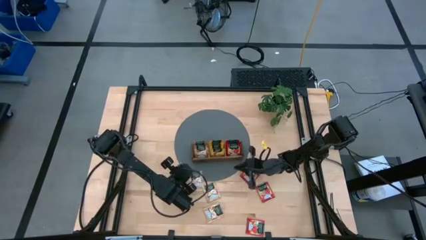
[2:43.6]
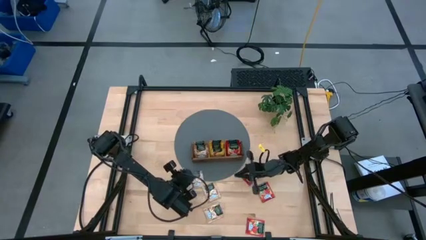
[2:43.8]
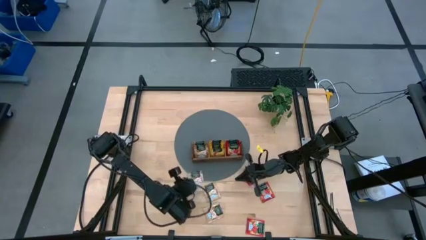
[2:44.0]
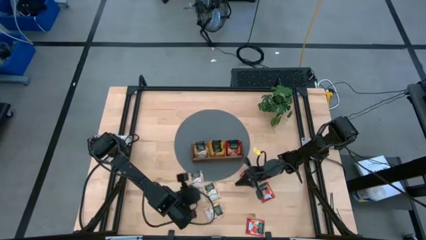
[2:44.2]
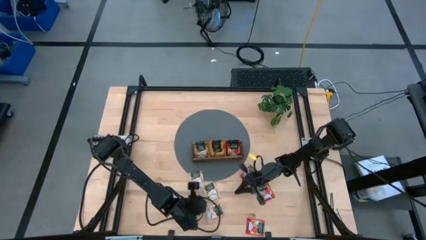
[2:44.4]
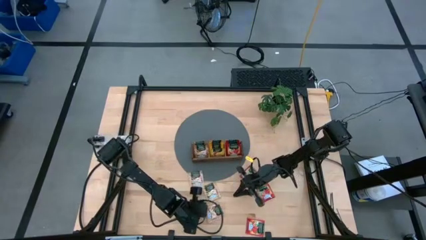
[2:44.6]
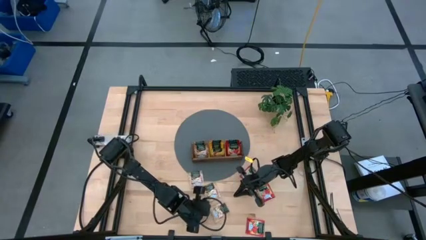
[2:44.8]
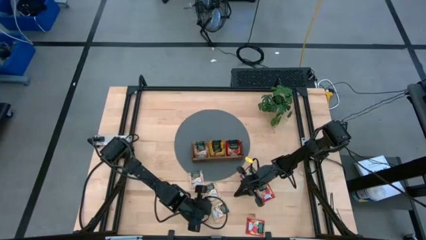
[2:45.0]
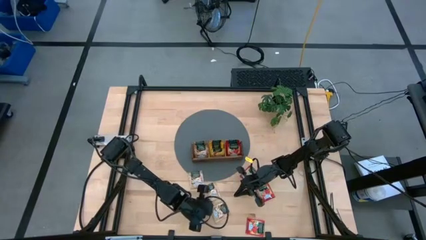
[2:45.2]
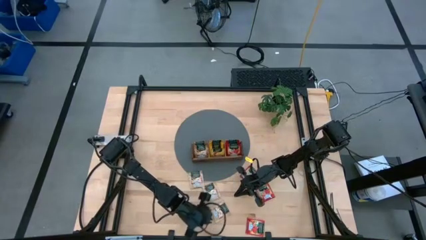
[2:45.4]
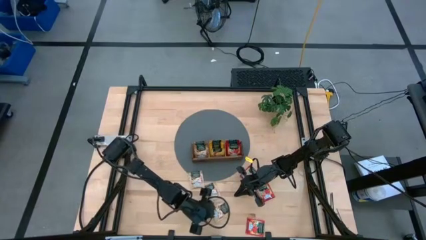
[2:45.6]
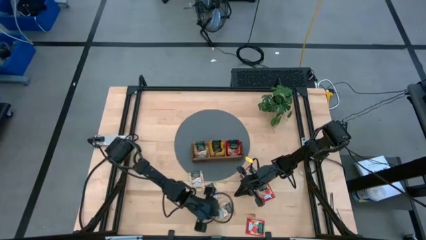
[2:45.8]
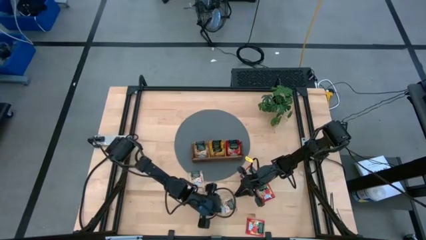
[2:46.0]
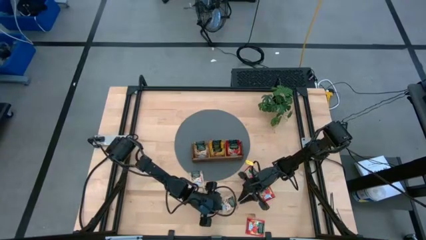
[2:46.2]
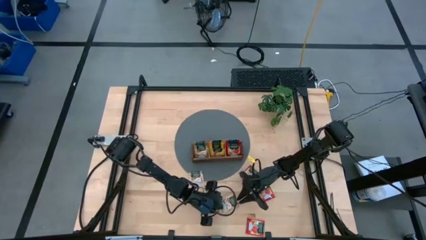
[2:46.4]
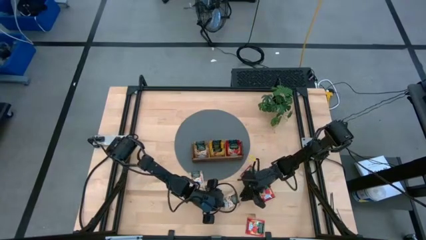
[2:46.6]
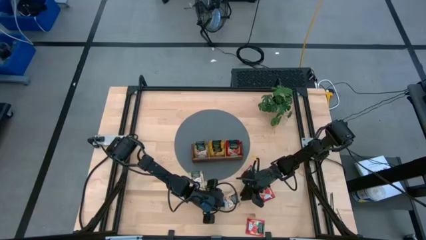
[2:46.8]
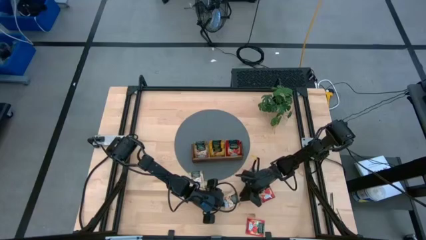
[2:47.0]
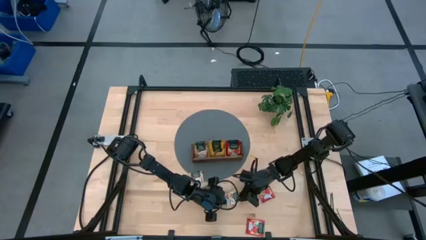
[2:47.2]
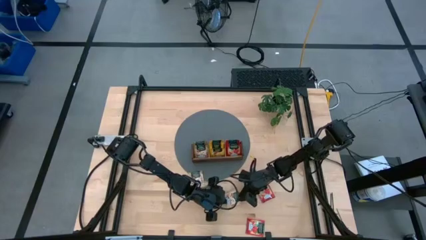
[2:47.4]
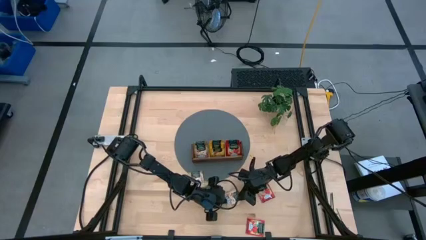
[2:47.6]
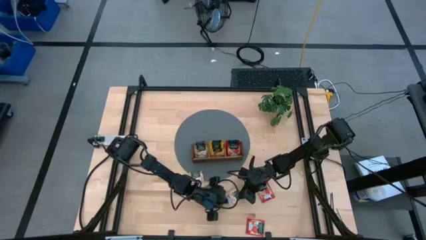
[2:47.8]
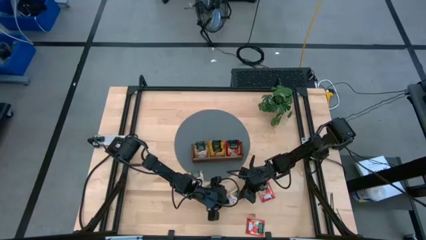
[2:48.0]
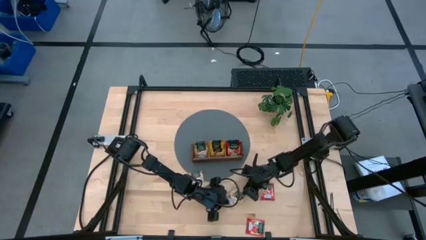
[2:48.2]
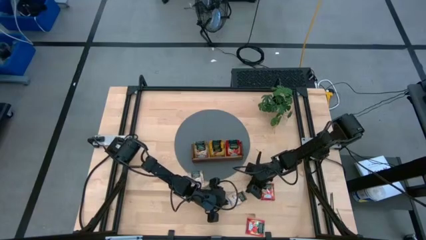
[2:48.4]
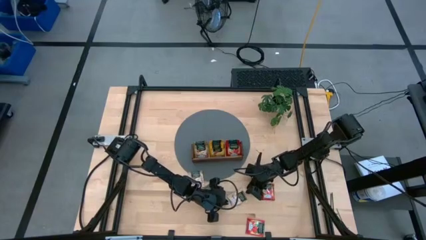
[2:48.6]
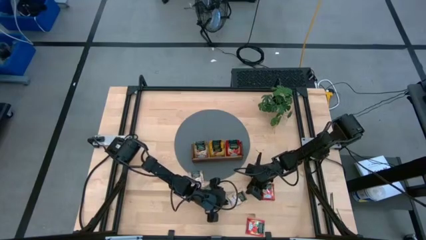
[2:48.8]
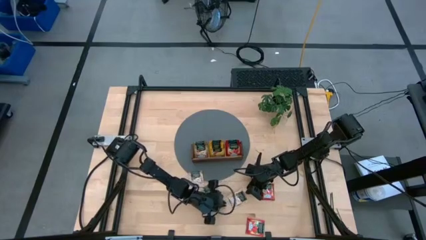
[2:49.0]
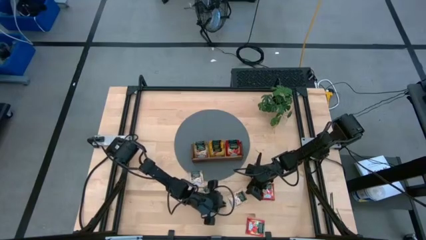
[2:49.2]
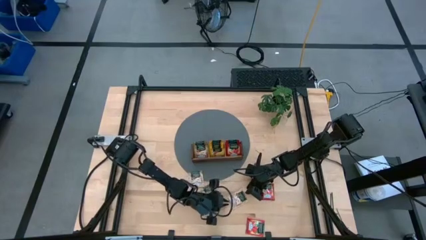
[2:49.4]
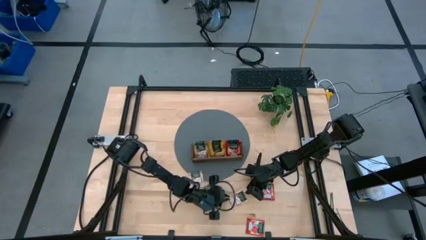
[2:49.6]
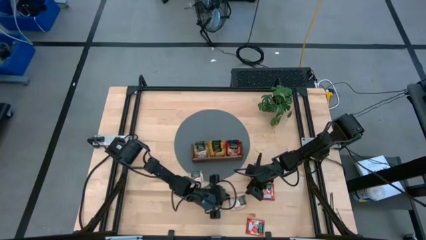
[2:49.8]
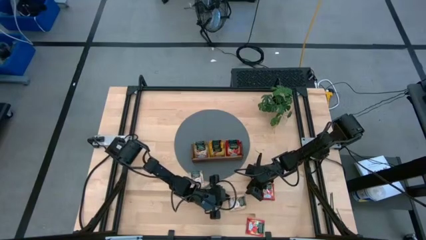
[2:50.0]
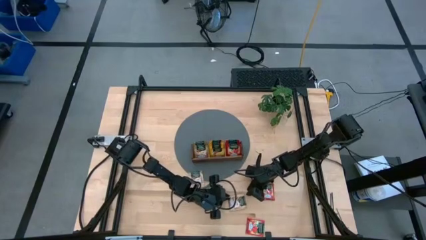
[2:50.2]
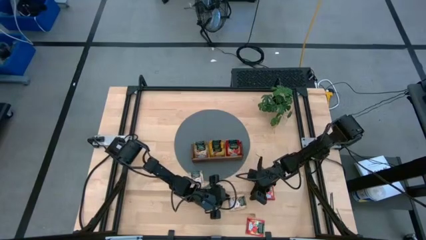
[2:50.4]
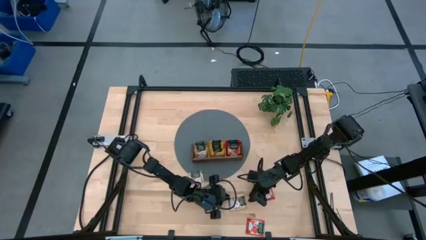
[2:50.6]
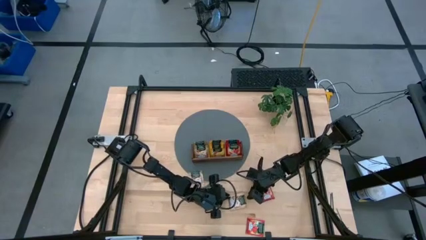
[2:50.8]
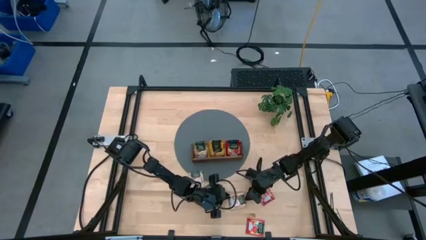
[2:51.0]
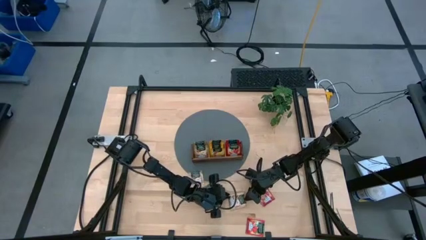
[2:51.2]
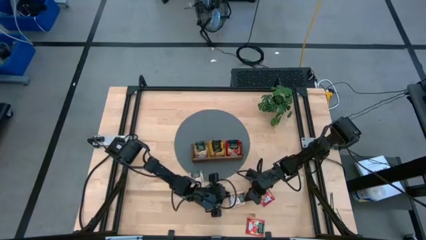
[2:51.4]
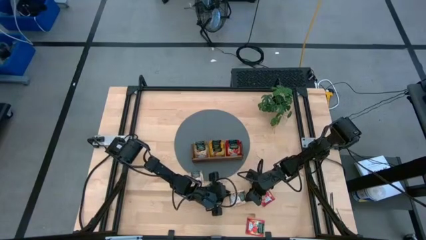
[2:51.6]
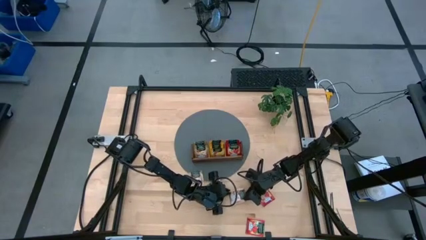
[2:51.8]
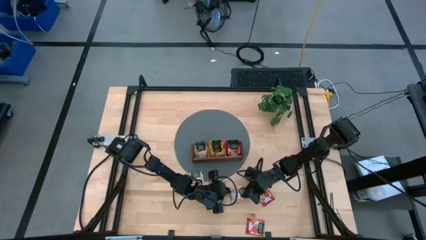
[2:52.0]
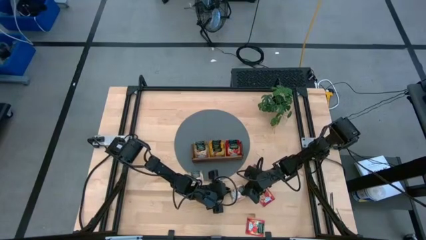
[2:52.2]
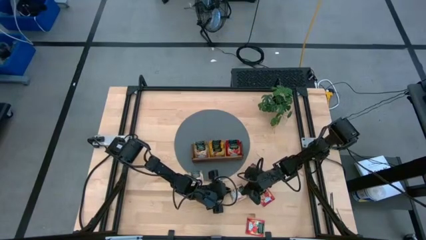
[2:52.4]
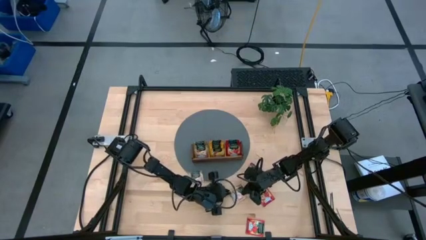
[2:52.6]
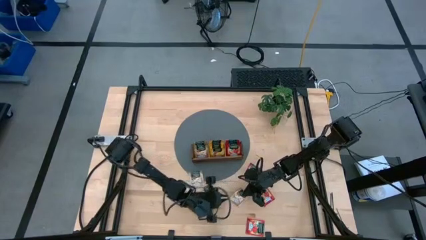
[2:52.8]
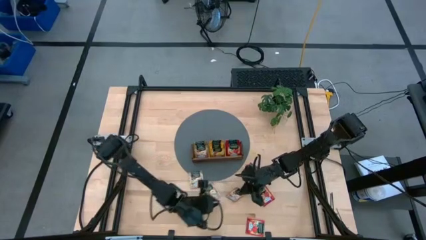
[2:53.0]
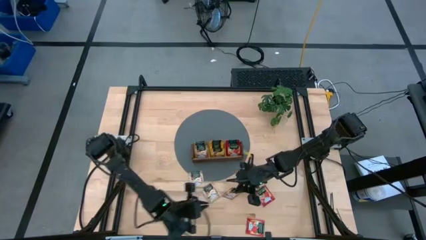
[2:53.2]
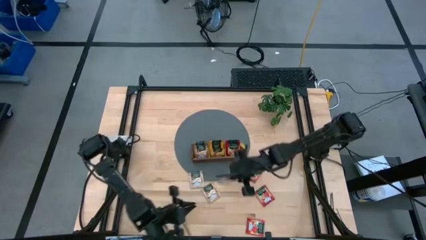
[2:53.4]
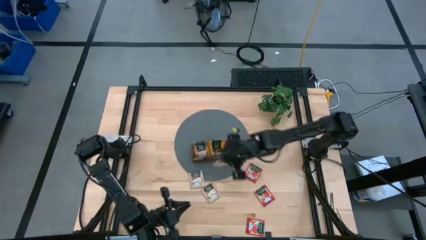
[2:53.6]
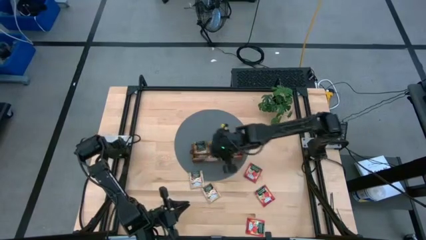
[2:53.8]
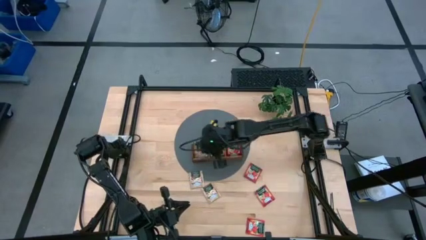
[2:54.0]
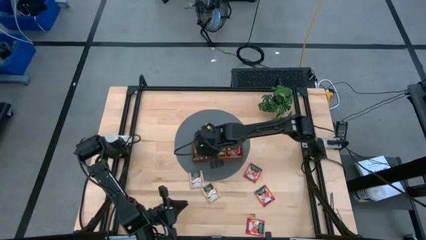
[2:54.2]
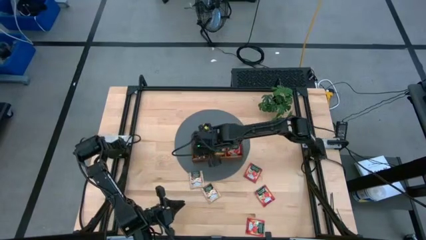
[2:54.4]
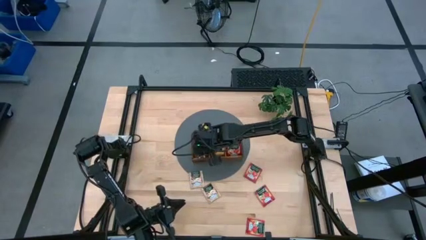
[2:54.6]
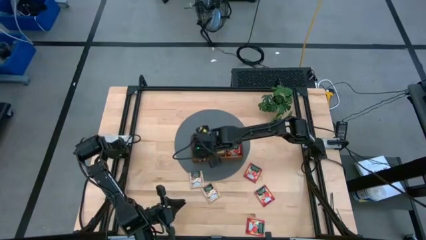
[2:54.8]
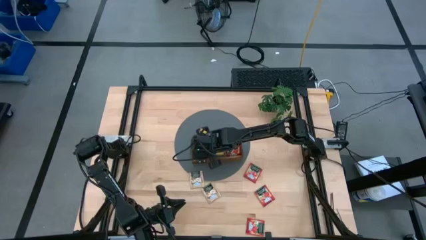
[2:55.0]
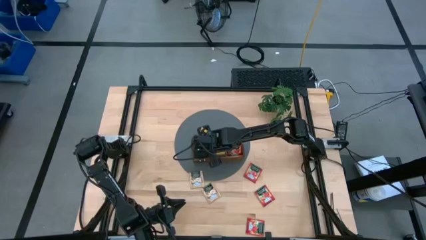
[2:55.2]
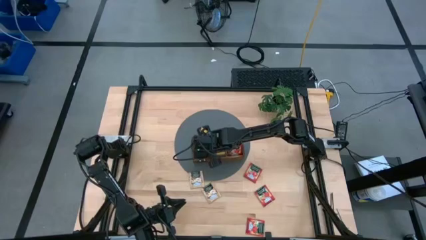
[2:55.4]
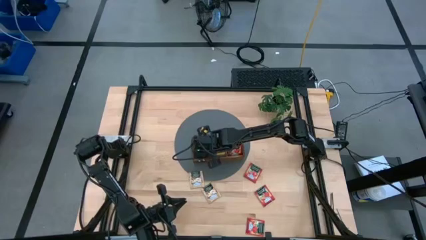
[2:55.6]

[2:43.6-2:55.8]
Task: Pick & Place Tea
Put the bottom brown tea bag into the left section of the wooden organizer

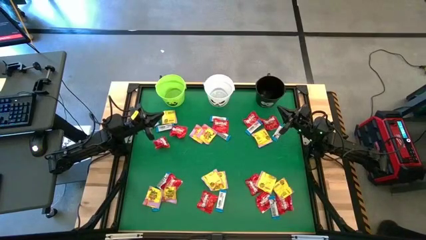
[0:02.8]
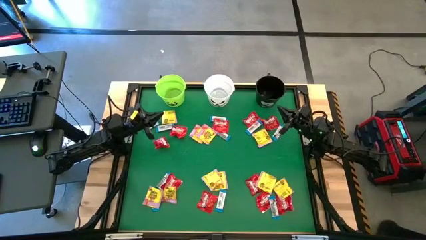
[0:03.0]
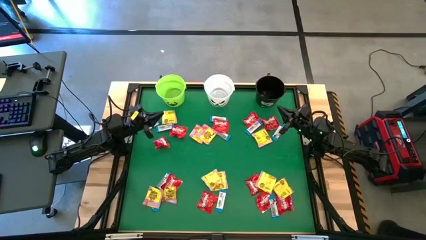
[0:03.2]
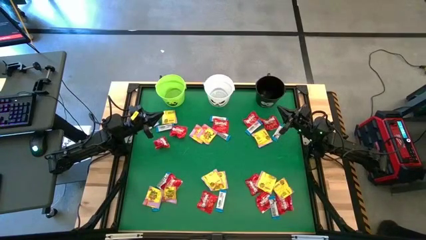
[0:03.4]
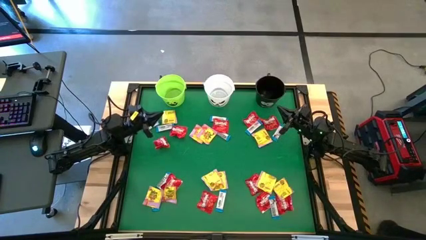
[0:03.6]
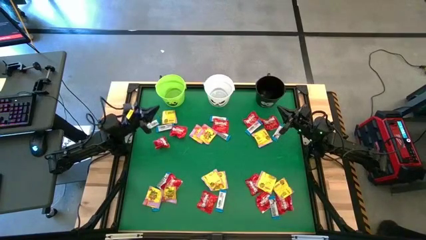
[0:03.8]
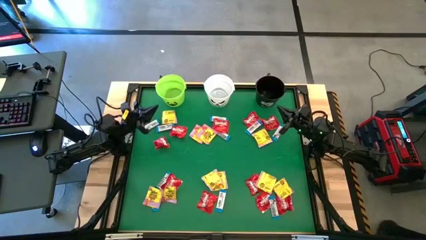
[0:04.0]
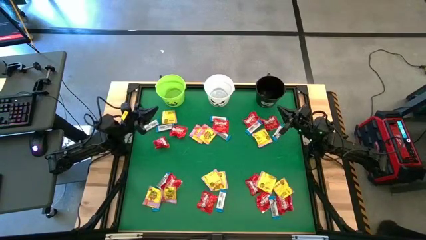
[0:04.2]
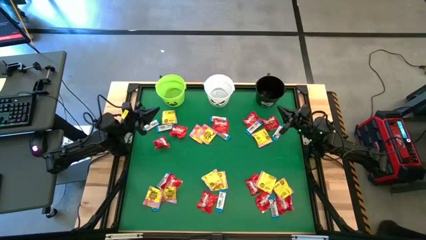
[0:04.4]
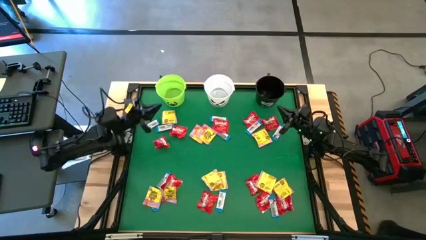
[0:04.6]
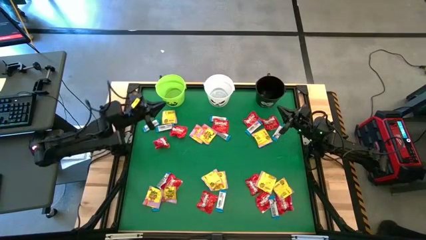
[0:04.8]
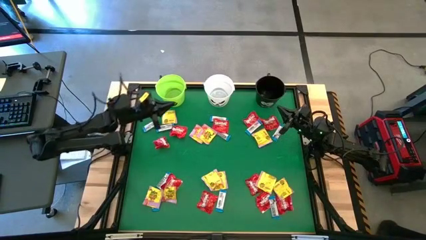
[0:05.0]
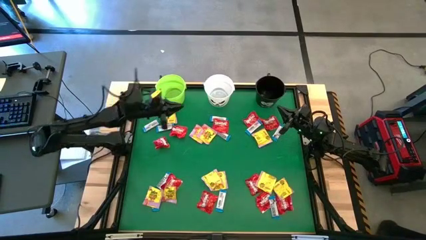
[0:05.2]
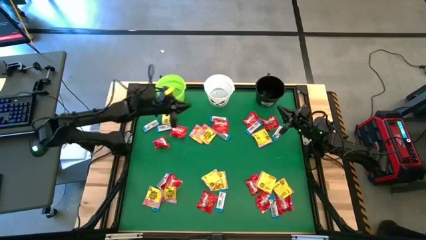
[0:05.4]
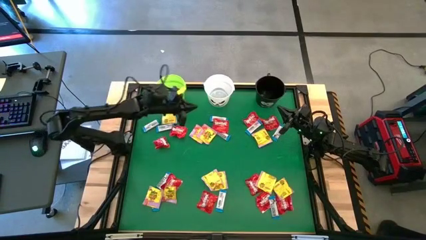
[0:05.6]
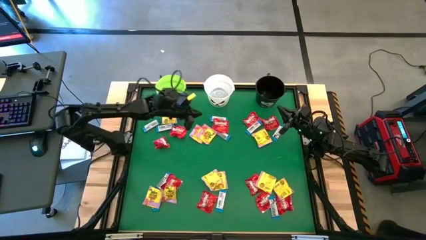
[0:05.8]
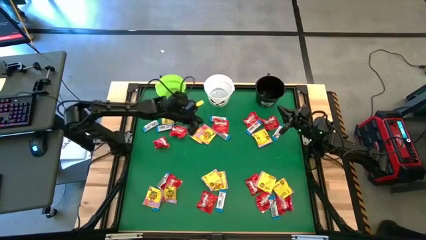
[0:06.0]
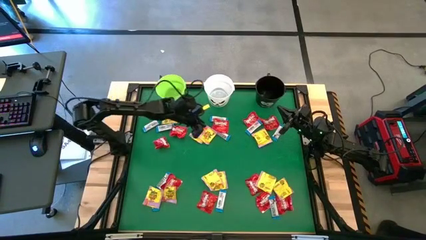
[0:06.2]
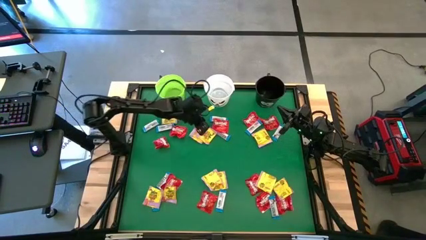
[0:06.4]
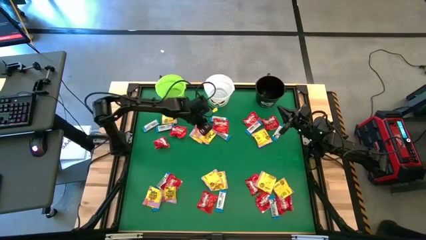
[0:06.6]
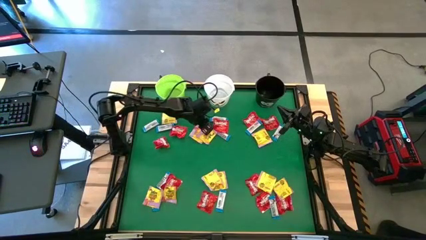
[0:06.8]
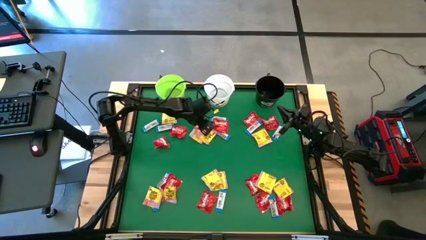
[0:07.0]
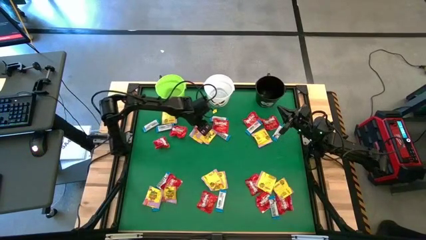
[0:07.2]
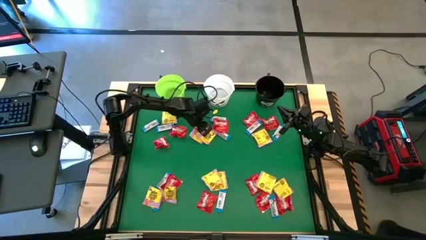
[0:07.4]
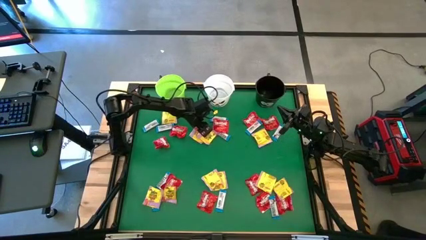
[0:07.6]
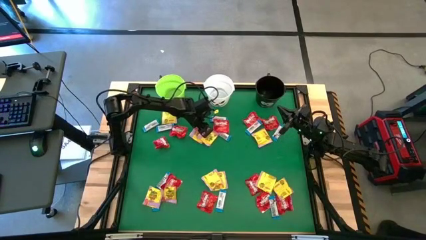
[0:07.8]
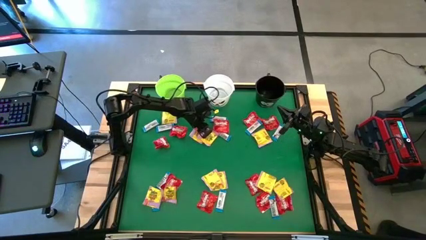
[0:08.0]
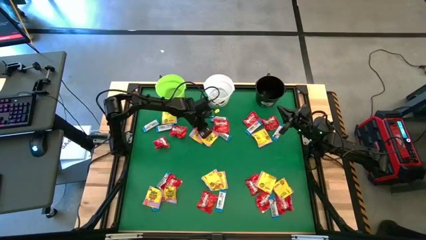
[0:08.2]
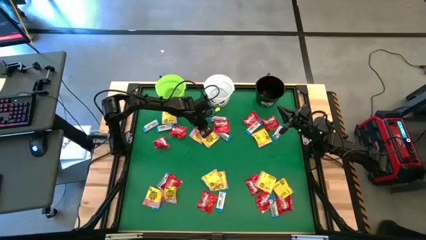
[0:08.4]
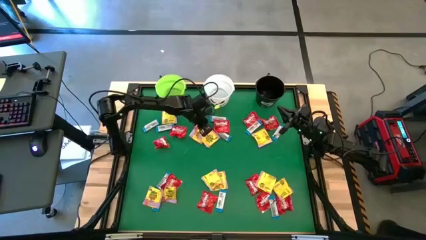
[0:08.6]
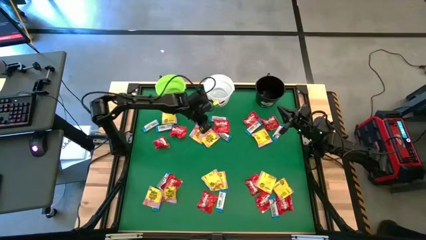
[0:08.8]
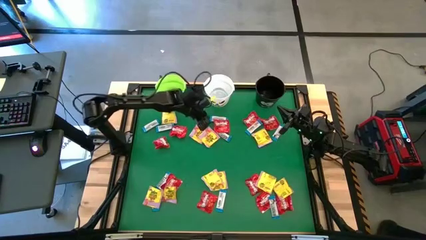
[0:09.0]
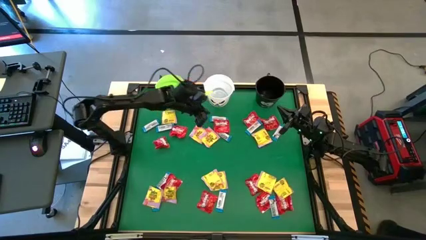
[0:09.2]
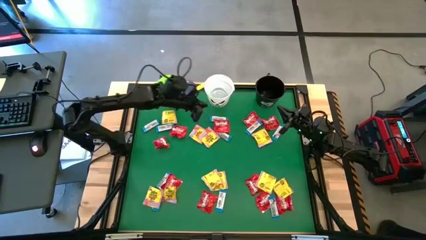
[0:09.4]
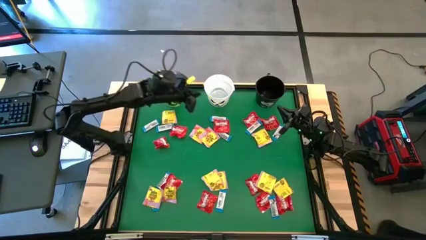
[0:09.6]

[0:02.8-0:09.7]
Task: Sort candy by brand, put in halloween buckets
Put the yellow candy into the green bucket
